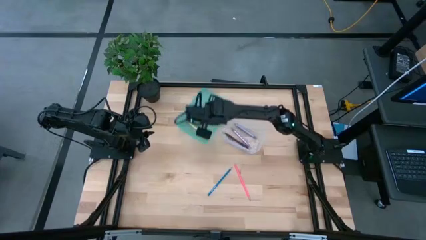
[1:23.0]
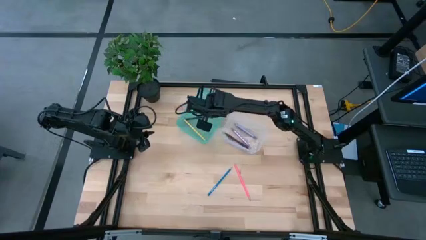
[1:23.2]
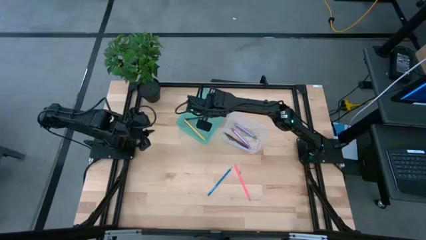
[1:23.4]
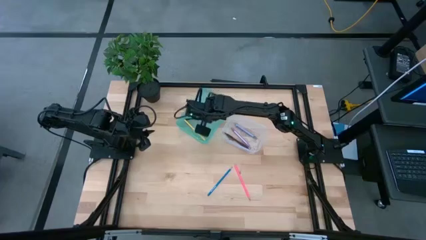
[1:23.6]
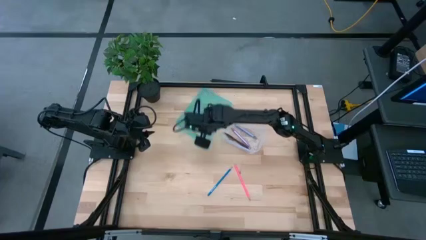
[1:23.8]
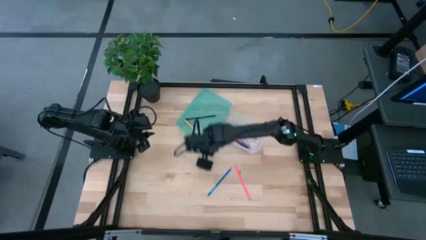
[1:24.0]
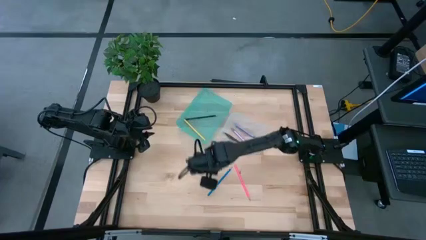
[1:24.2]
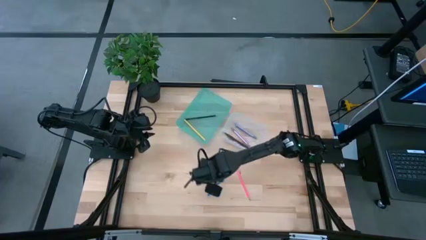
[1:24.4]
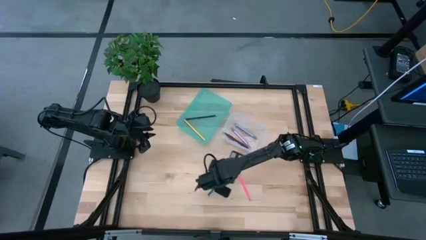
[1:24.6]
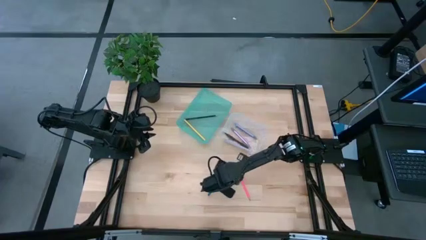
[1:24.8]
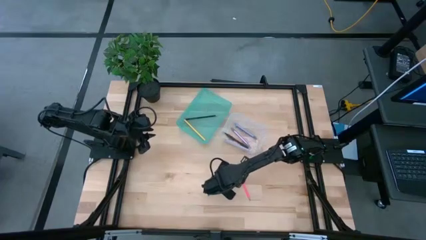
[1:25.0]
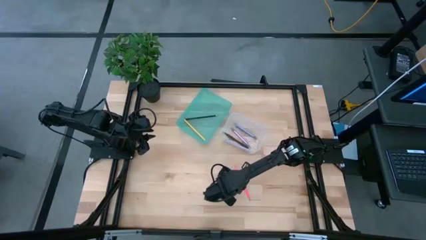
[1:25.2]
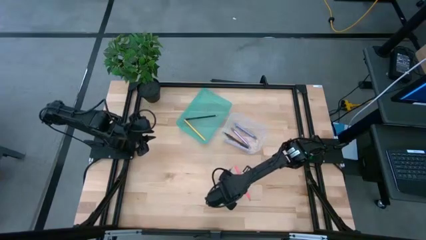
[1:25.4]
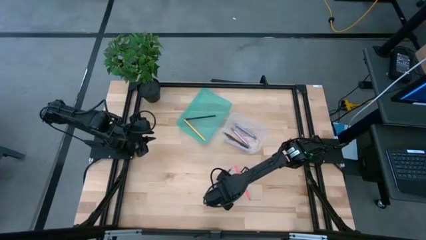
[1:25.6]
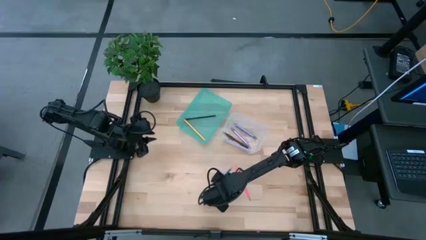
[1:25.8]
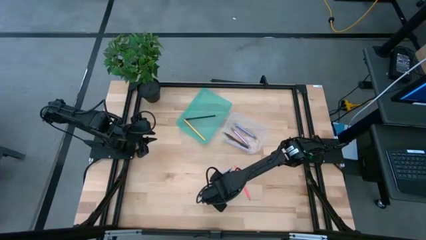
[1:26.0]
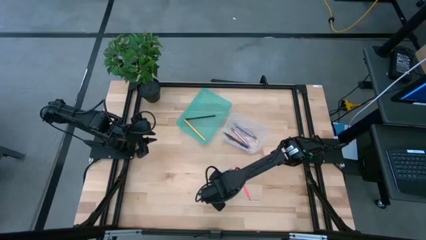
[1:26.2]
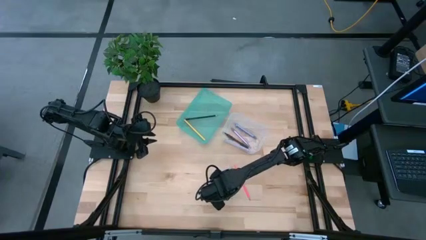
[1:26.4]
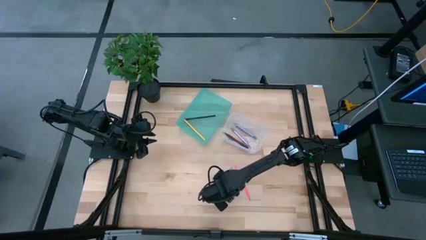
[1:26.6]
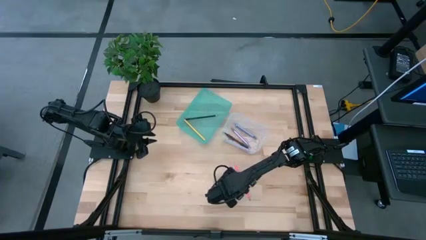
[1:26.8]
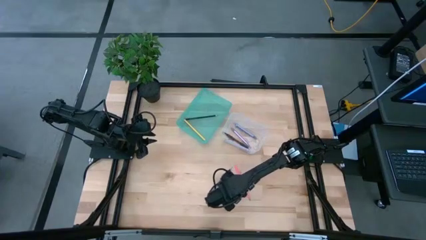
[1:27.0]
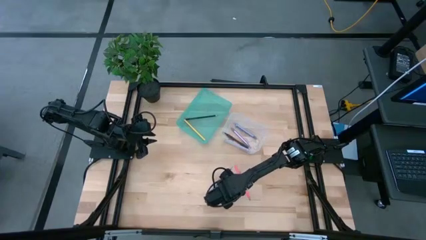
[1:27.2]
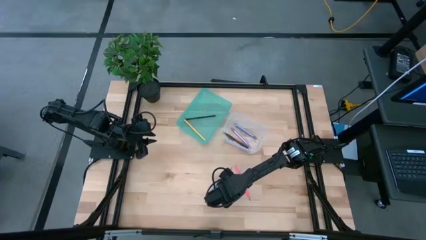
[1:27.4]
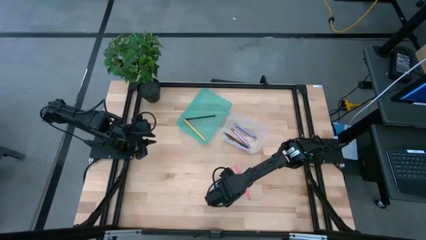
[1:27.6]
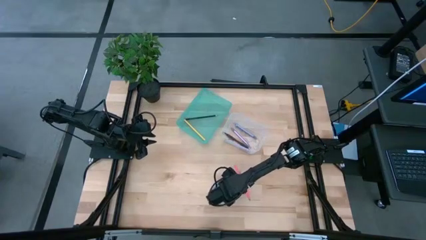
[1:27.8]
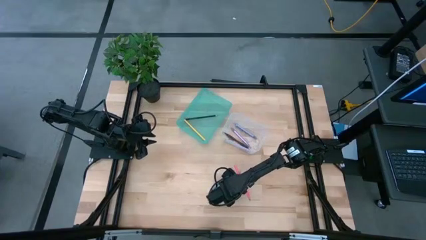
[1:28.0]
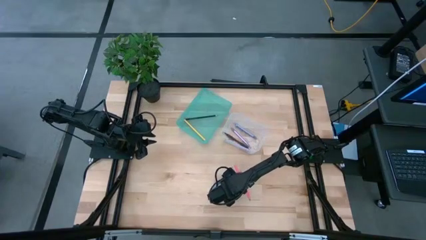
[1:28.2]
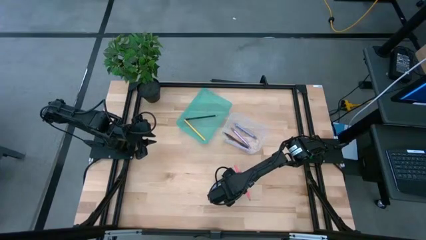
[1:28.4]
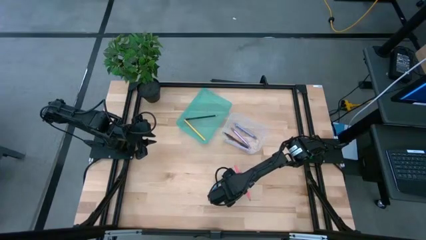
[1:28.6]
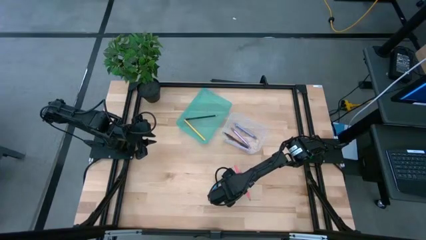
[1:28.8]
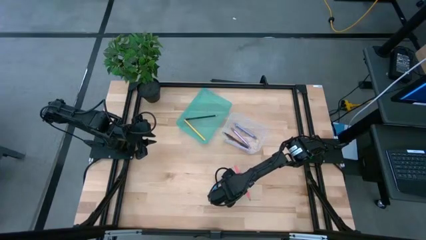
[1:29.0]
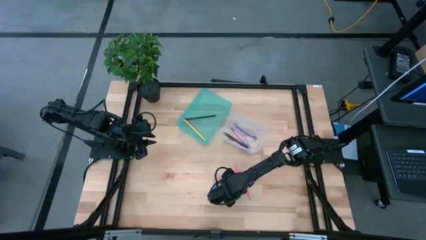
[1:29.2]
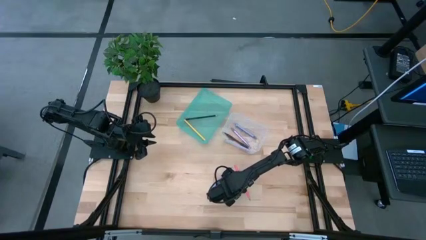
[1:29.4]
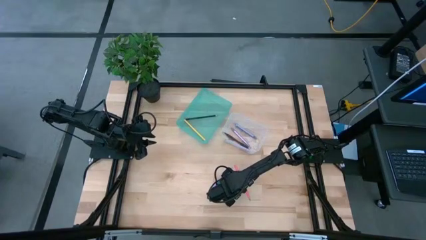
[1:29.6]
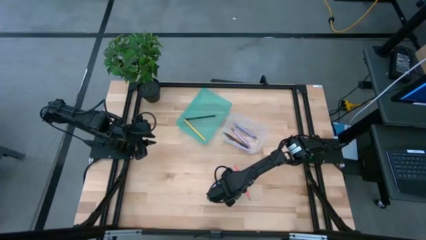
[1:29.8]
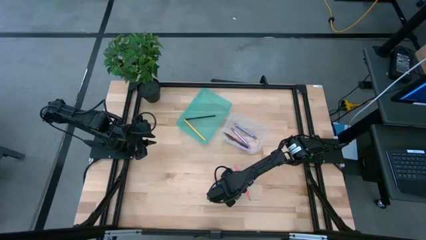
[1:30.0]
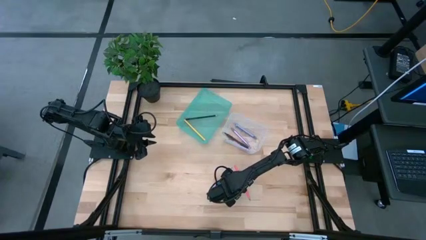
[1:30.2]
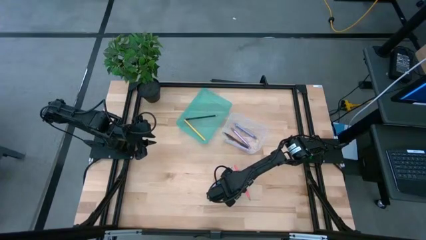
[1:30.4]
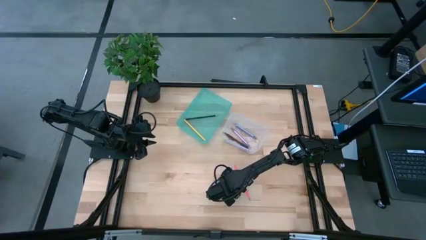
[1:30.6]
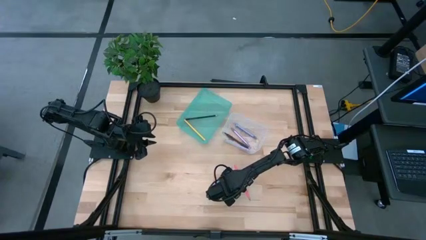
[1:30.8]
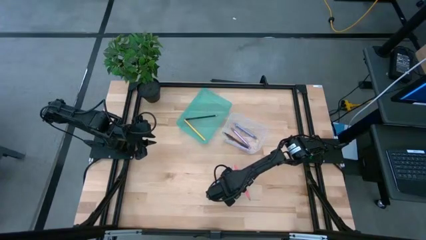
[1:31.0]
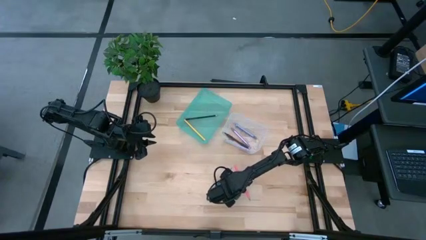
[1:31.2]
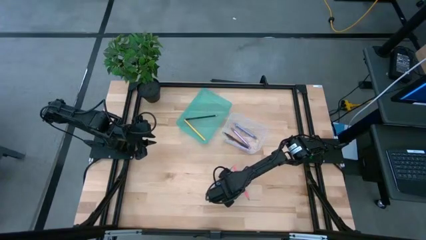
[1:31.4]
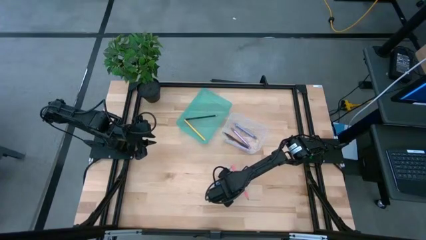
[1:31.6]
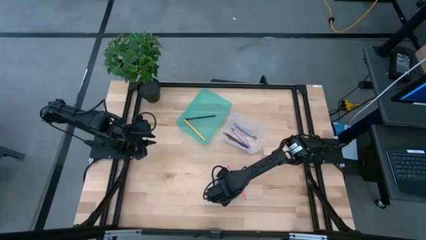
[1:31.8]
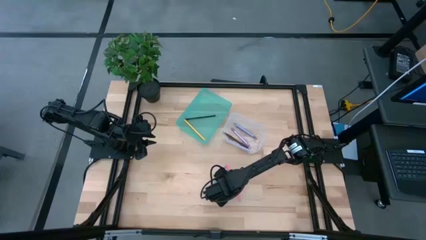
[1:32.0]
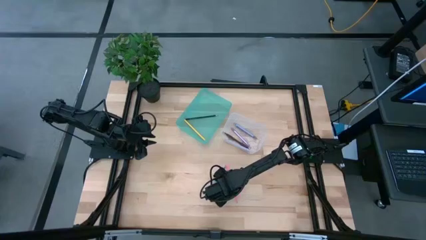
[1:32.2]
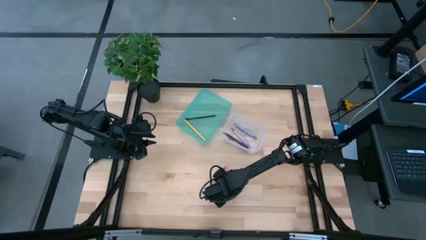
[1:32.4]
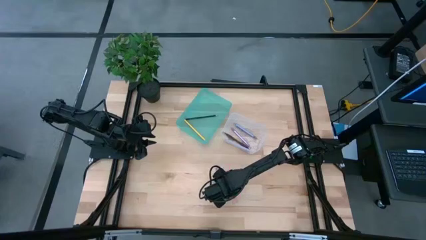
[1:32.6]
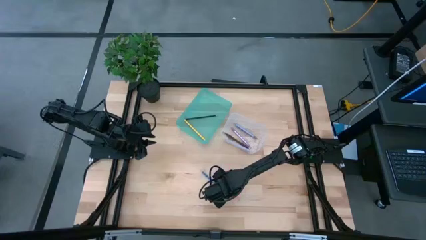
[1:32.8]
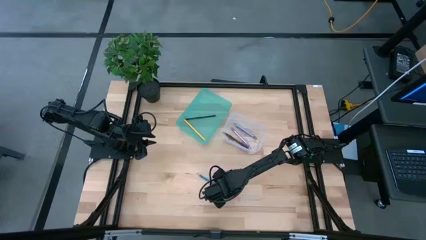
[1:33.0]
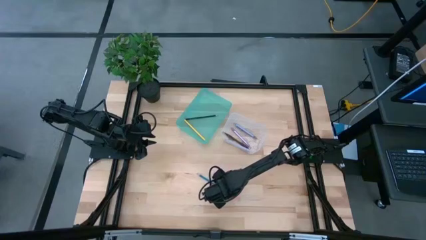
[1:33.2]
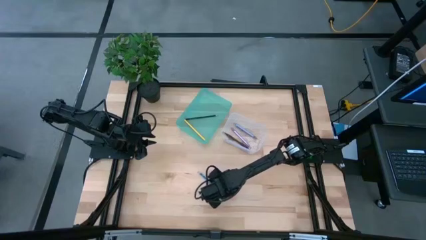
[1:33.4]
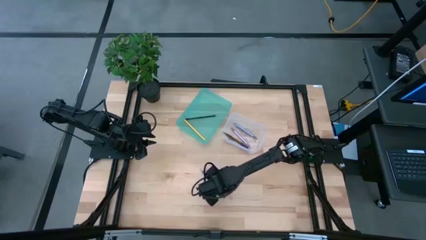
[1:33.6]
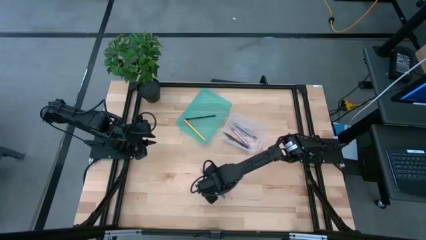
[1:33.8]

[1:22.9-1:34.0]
Task: Sort pens & pencils
Put the pink pencil into the blue bin

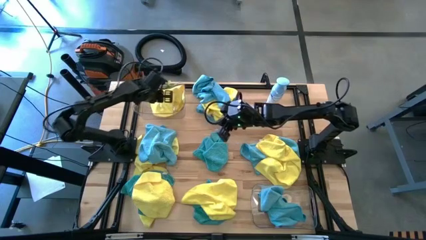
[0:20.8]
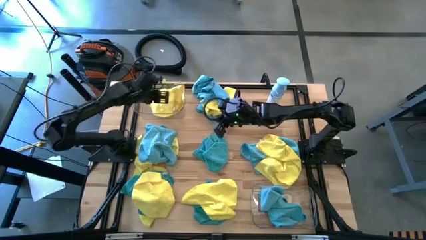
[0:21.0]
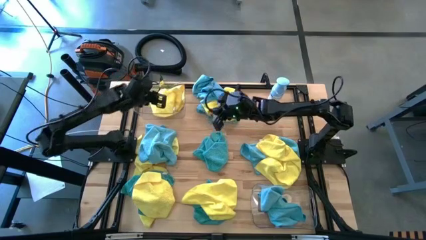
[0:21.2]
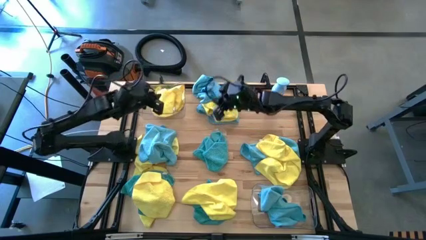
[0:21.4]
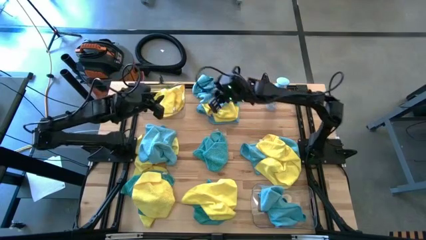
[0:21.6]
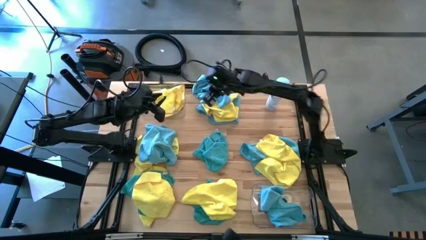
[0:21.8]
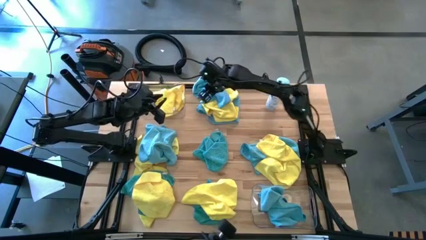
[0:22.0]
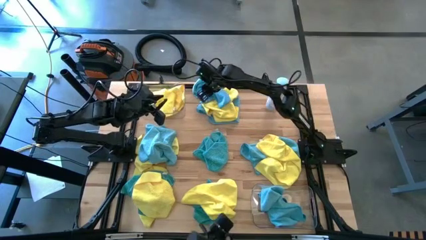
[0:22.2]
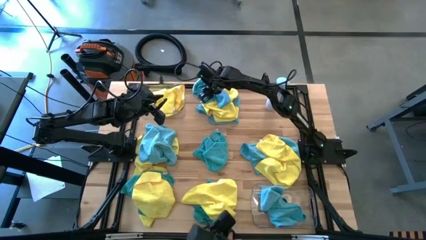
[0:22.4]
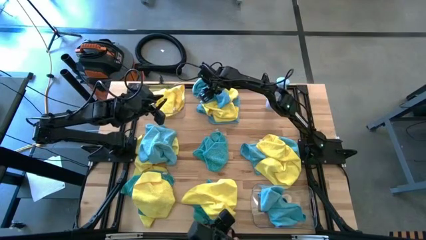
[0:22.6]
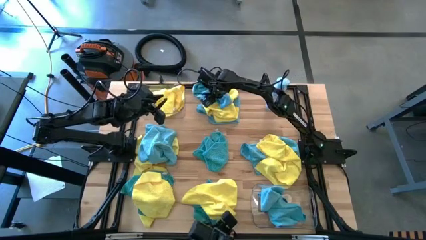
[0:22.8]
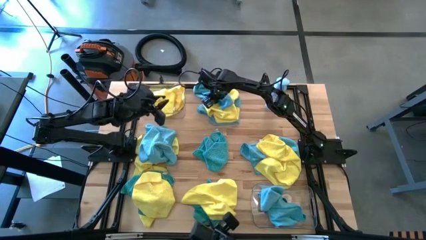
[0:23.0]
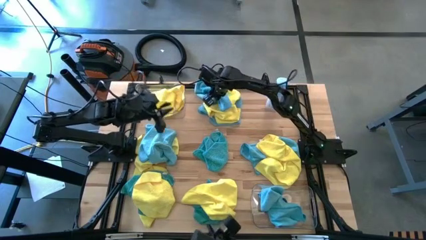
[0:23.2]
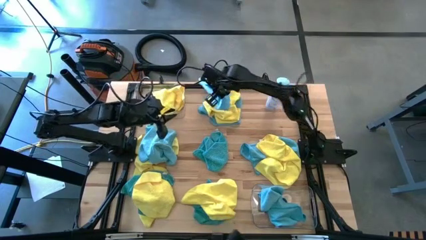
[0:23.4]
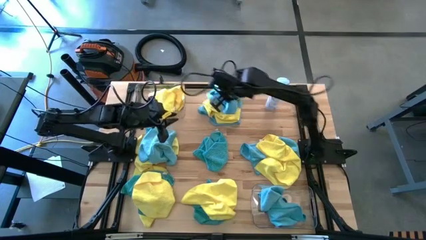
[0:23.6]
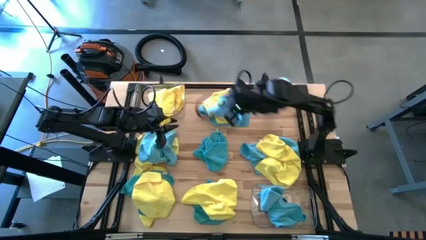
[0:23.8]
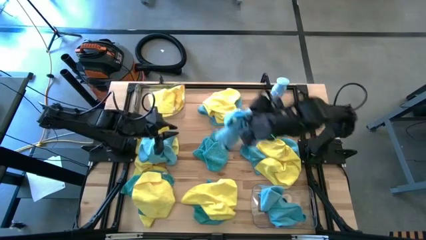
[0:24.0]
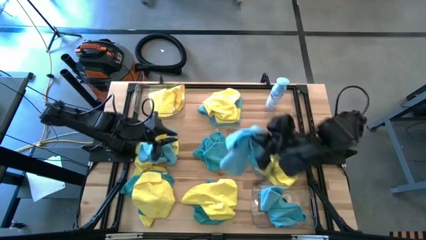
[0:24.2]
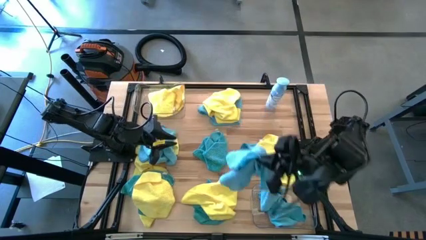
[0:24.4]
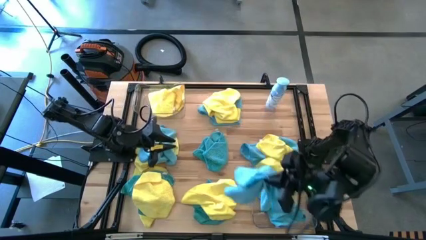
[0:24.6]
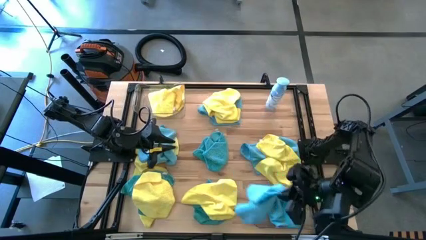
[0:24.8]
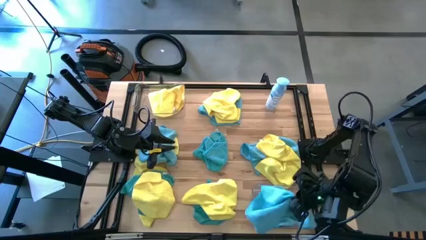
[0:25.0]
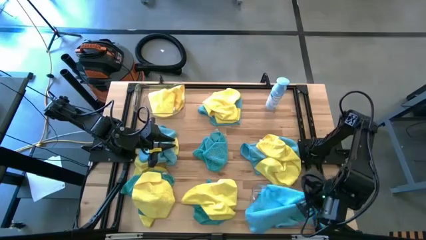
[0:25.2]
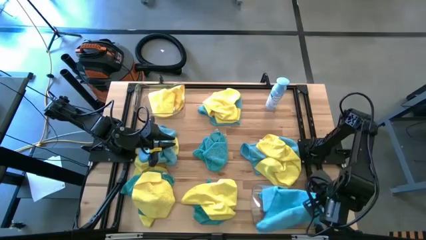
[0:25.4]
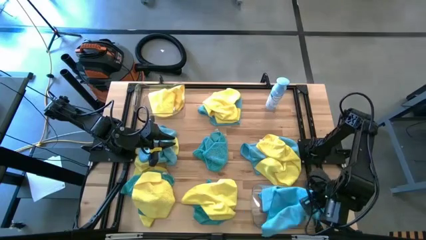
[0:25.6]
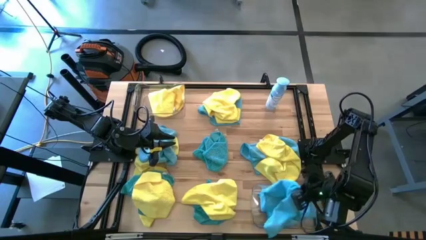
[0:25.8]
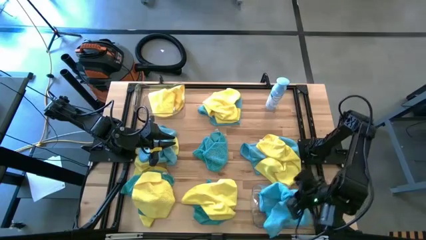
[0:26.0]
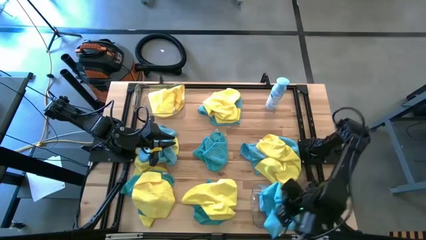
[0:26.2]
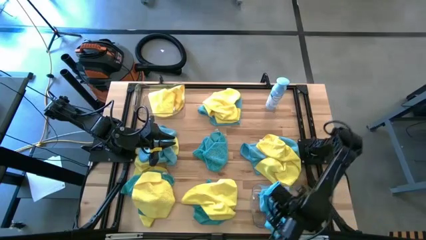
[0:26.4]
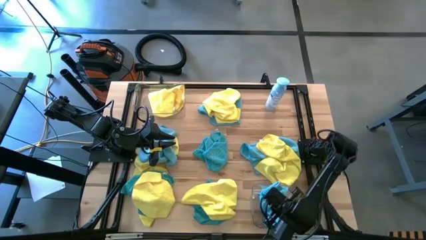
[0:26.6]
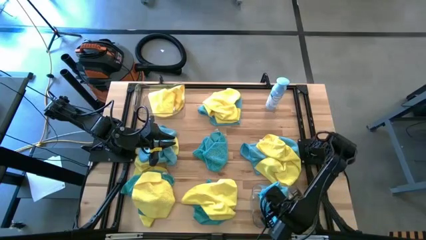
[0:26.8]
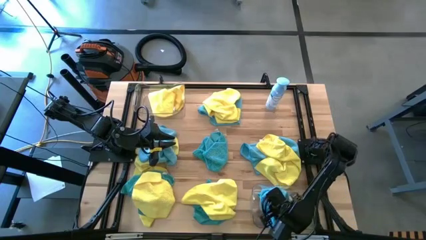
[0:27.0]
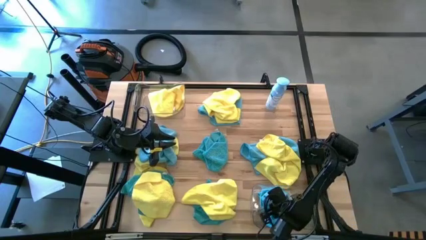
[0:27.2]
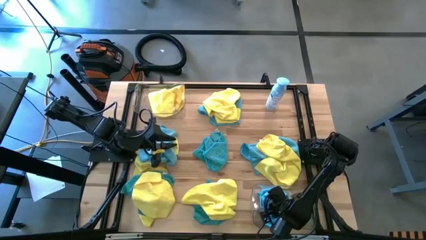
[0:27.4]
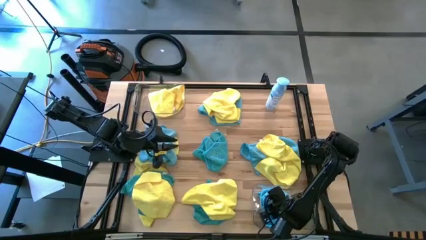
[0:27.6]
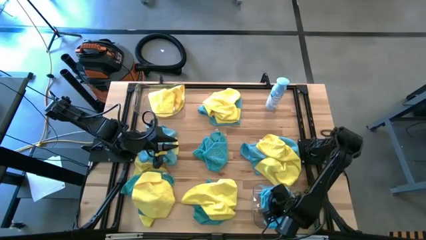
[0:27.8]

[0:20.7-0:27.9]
Task: Sort microfiber towel by color & place in baskets
Put the blue towel into the bottom transparent bin
